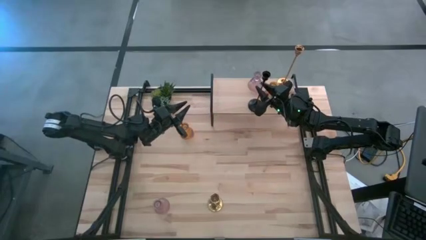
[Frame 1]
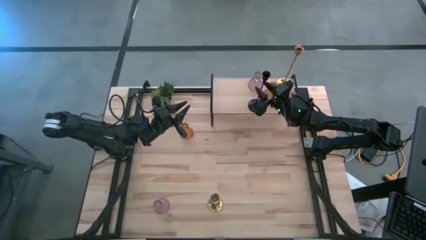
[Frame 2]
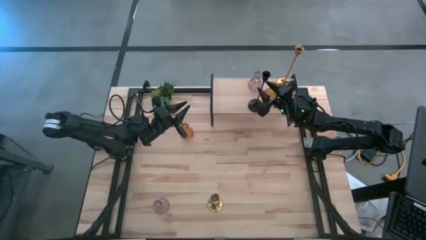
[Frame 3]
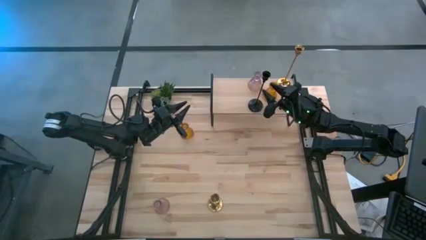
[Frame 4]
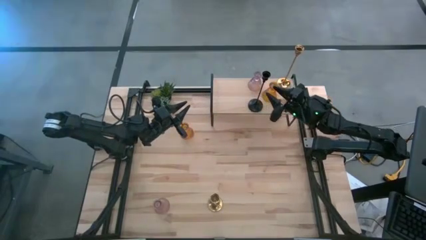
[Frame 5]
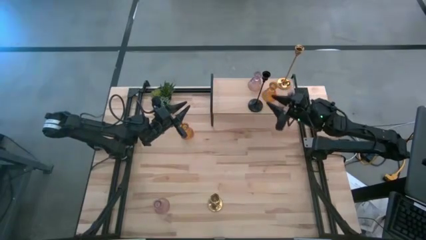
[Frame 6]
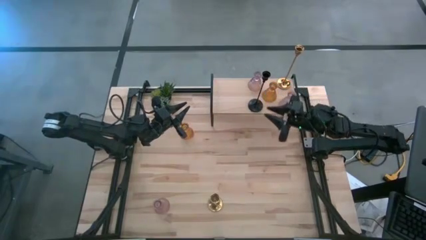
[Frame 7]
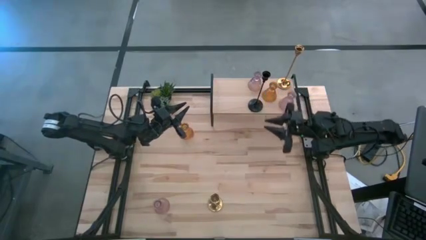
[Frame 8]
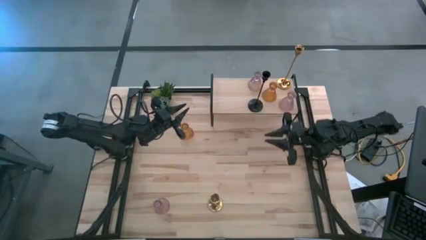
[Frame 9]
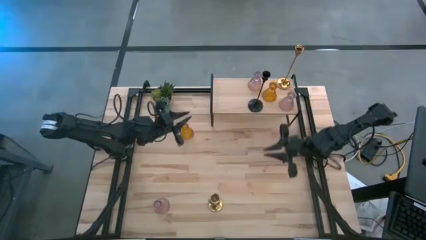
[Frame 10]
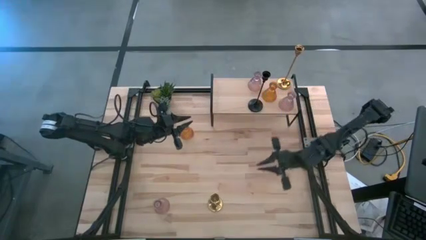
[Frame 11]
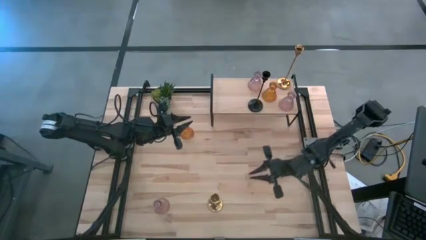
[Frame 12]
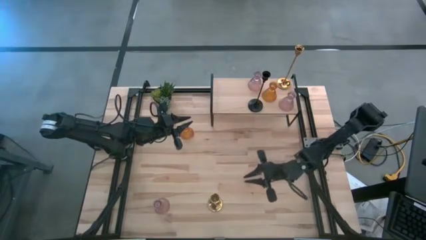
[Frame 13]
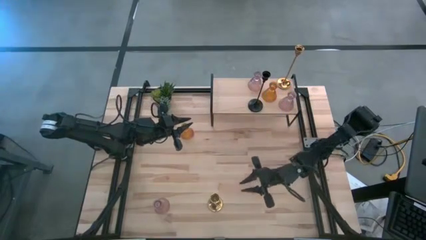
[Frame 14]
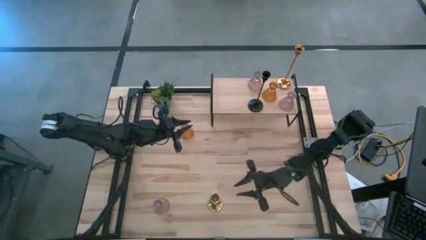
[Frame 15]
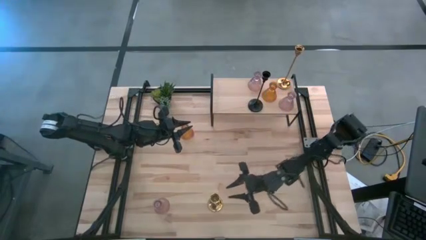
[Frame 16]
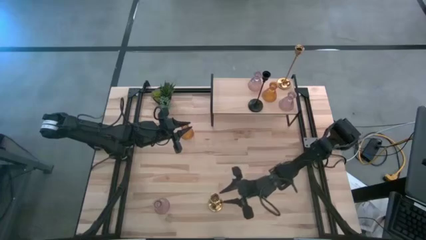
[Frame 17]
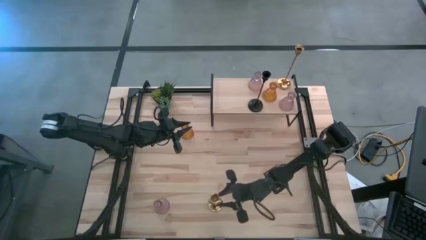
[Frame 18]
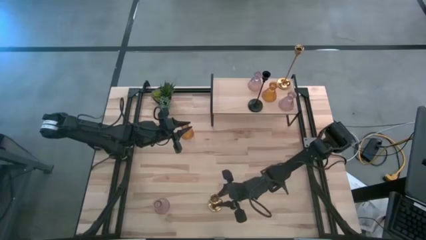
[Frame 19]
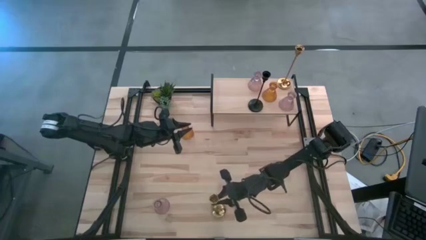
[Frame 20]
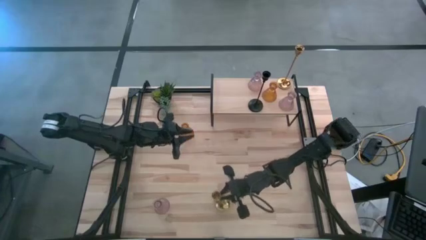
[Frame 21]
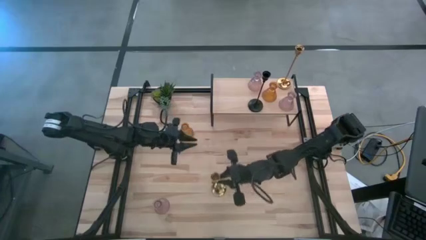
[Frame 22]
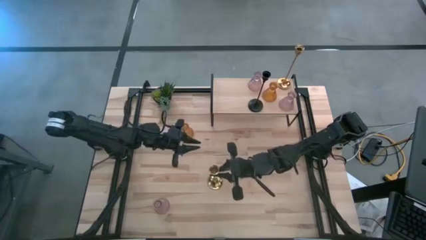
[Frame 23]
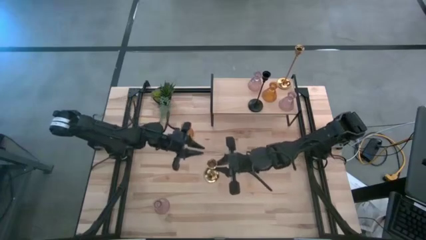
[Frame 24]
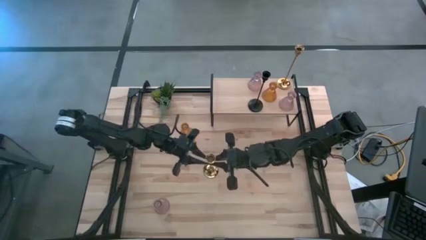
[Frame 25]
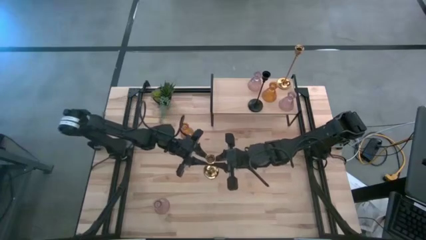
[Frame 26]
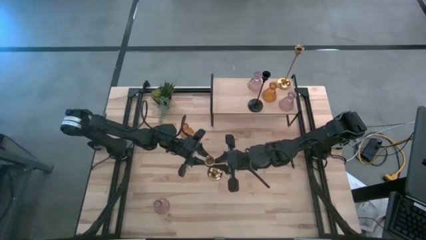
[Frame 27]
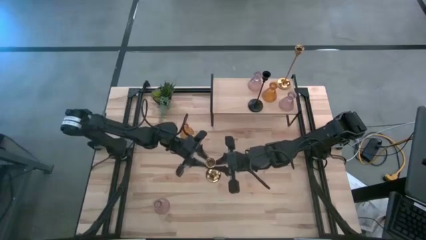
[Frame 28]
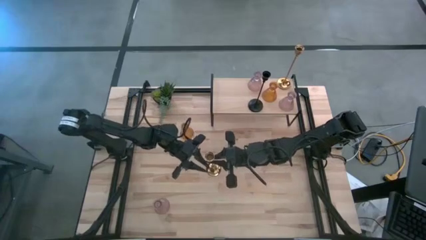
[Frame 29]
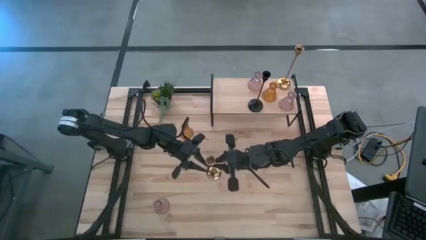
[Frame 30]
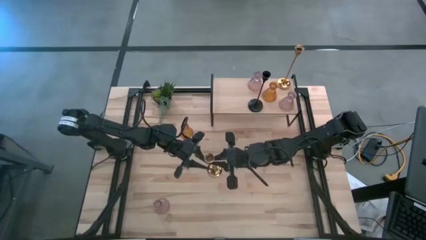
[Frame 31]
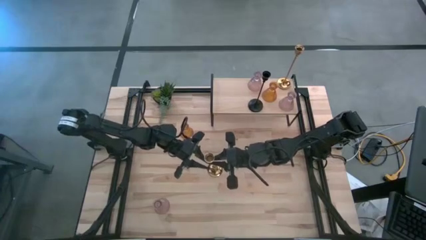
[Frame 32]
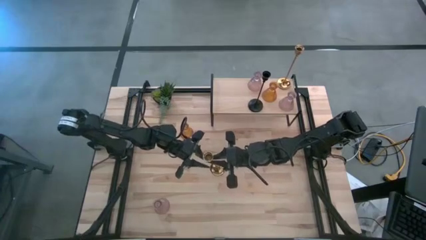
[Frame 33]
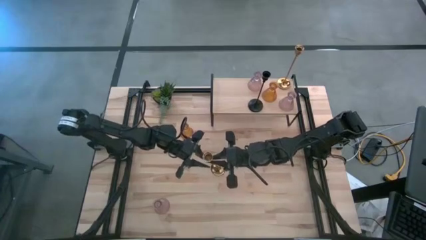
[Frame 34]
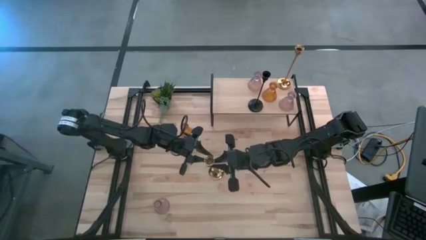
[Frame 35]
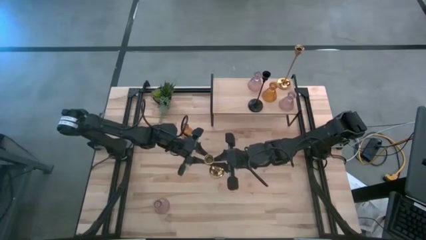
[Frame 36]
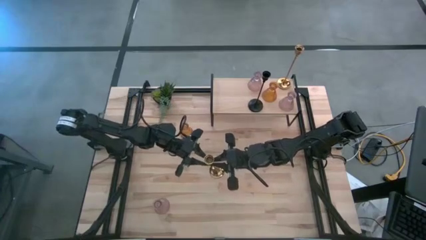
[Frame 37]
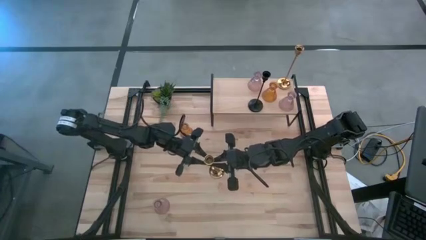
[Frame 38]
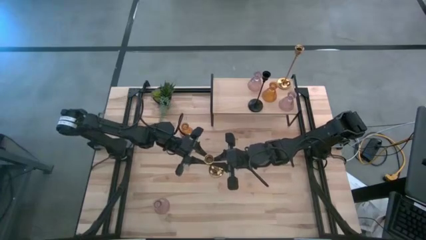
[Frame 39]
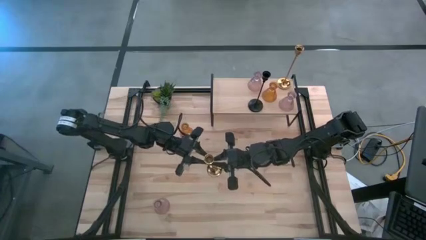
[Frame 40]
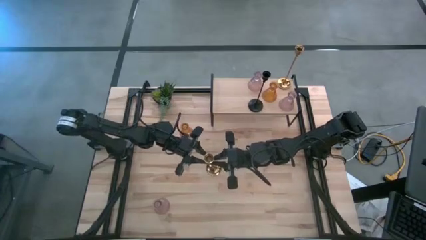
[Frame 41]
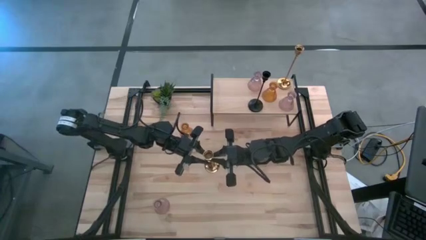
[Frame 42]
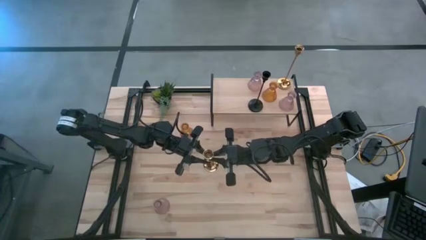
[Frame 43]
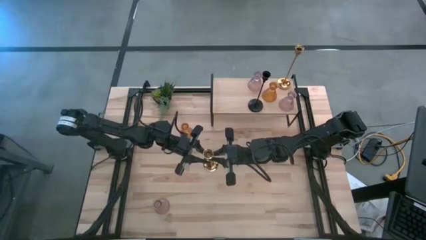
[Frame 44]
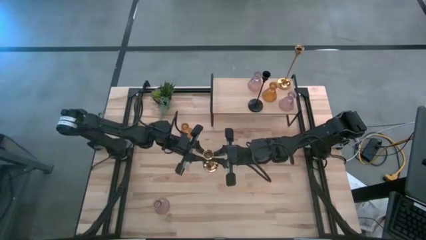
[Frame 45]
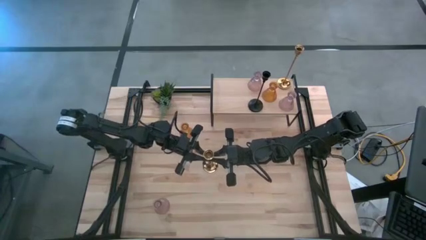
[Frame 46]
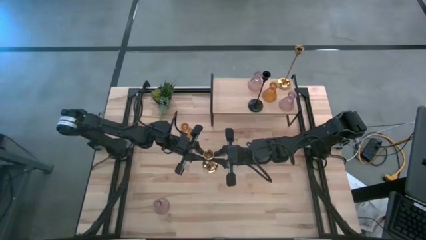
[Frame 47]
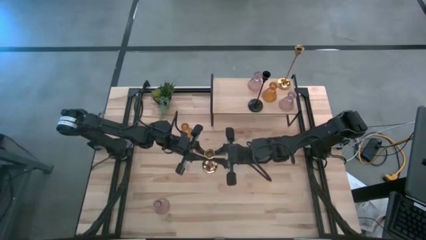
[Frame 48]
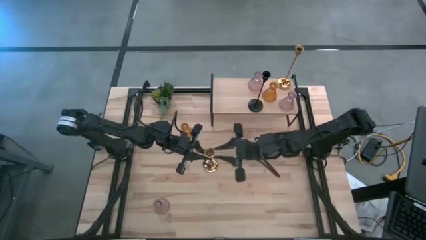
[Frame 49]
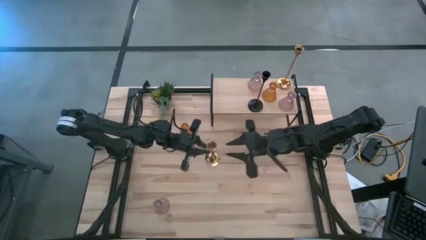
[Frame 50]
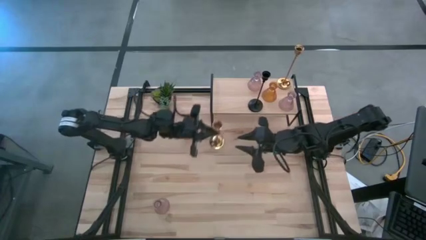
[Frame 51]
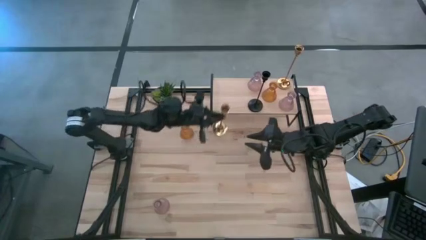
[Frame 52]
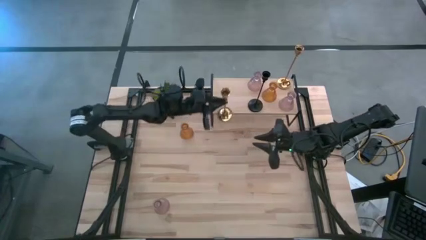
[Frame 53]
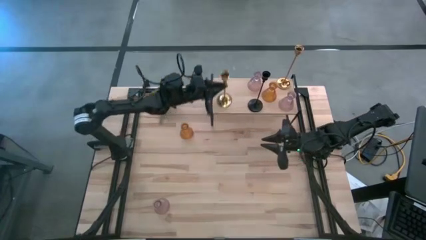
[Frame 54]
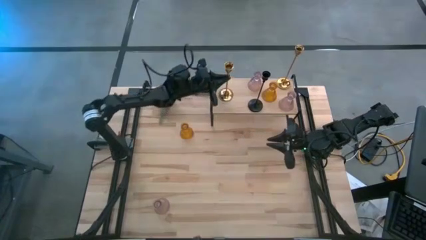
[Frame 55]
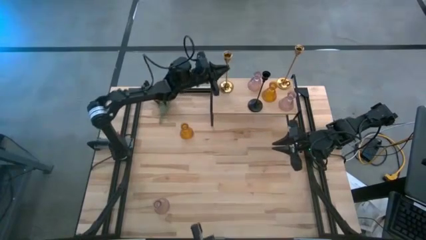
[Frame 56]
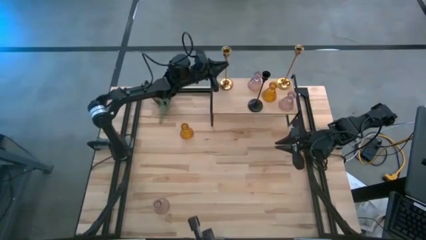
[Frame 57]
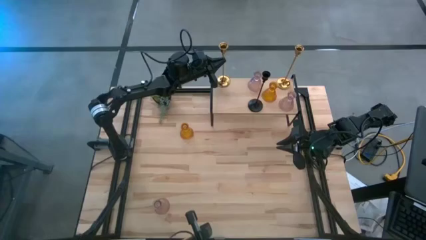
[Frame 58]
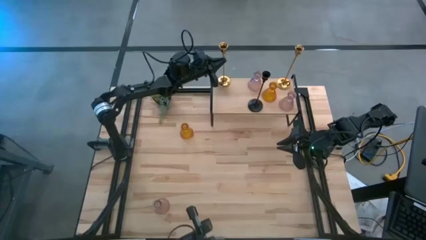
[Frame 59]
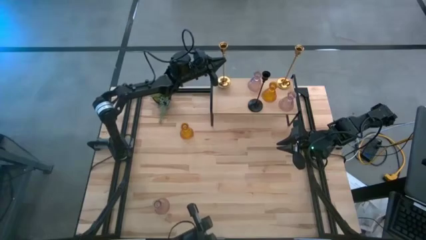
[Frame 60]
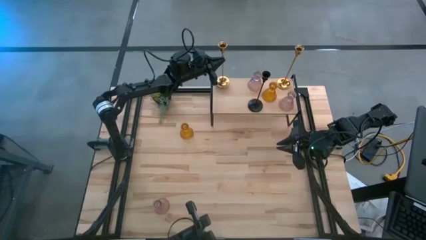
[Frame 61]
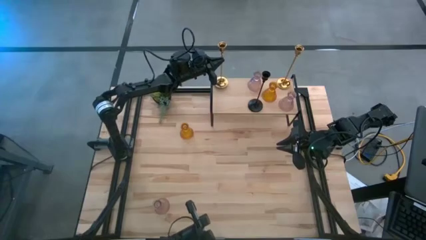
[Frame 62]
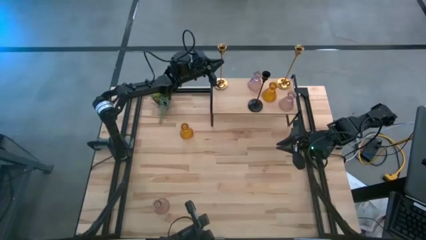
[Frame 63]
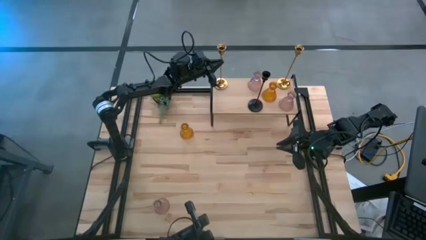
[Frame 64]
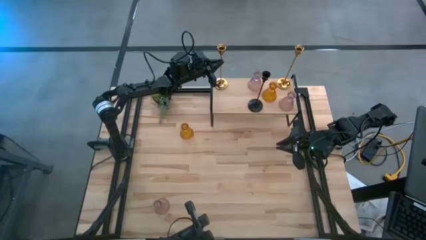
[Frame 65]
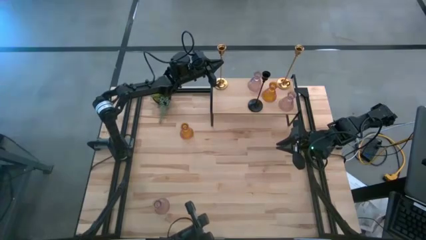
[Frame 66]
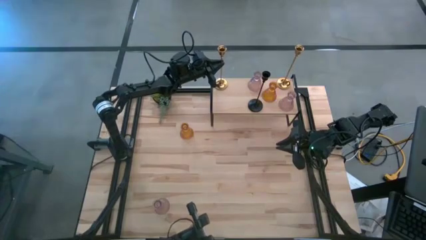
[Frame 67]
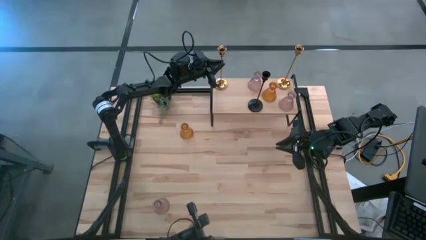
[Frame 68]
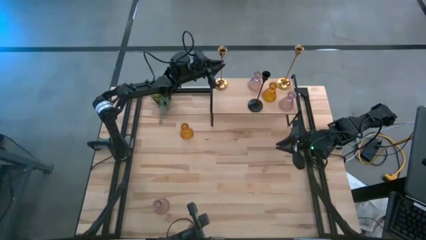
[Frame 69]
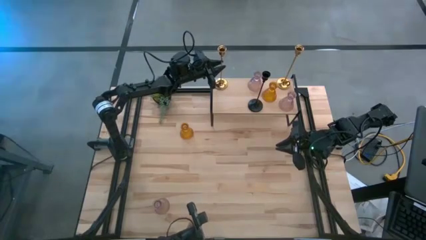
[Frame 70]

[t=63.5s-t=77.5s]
Task: Pick & Place candle stick holders
Put the gold candle holder on the shelf
